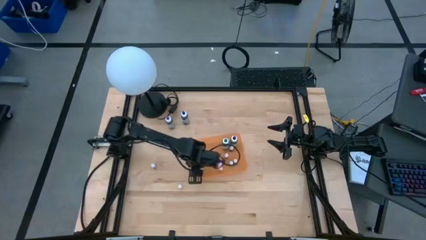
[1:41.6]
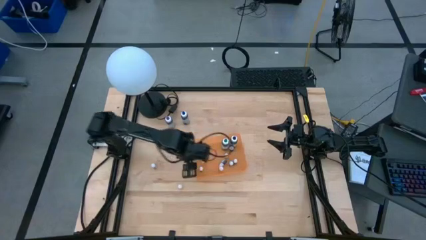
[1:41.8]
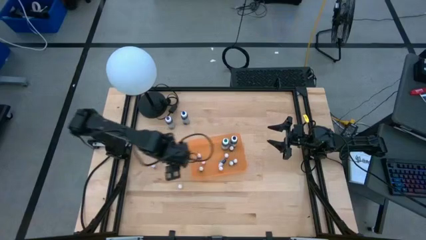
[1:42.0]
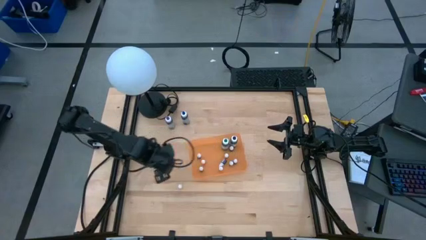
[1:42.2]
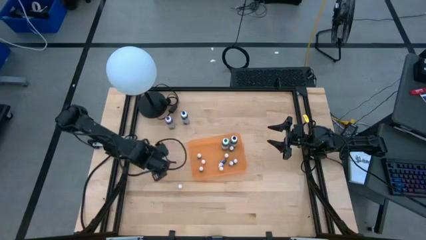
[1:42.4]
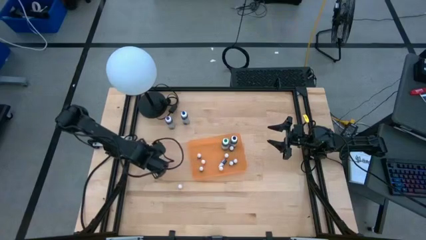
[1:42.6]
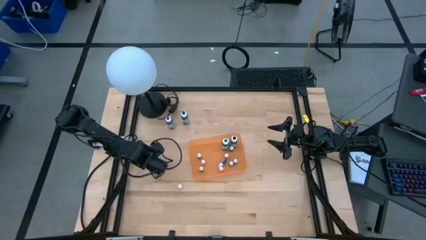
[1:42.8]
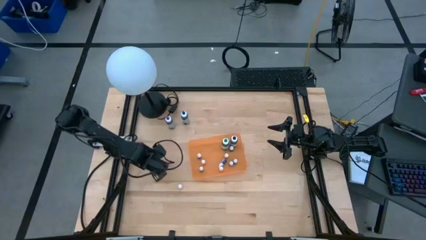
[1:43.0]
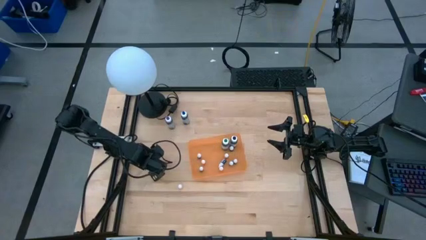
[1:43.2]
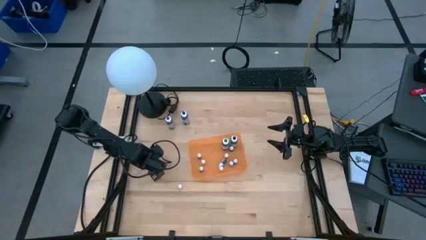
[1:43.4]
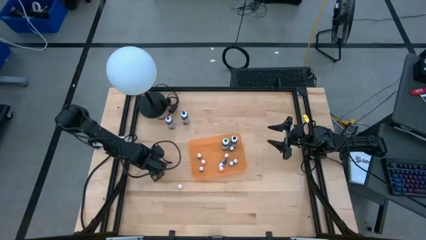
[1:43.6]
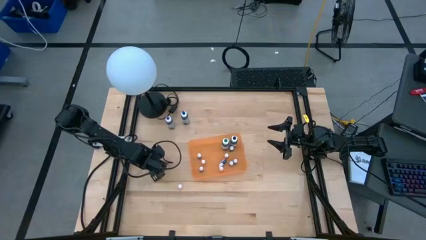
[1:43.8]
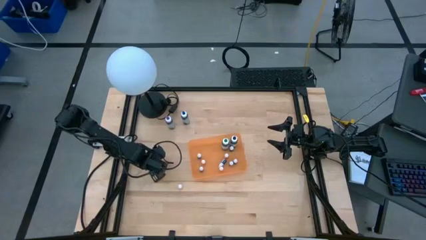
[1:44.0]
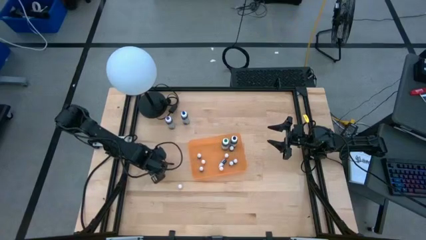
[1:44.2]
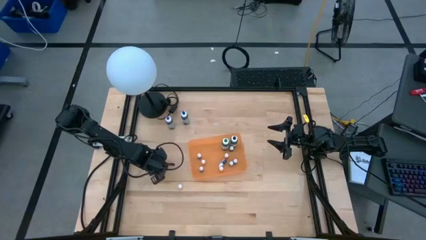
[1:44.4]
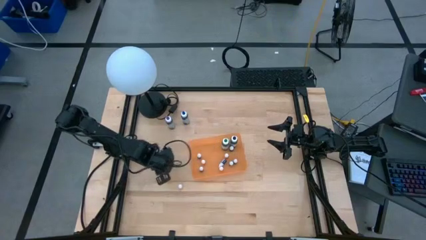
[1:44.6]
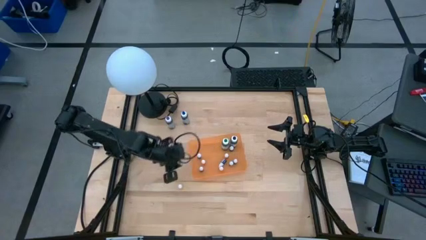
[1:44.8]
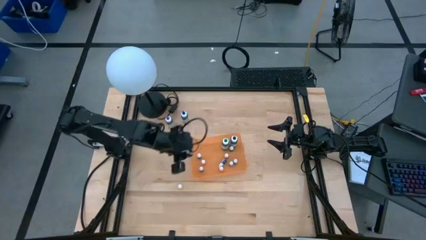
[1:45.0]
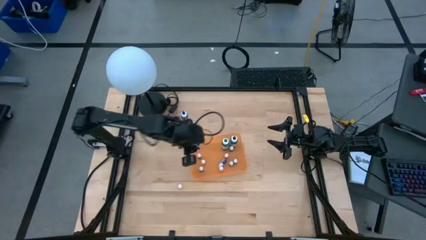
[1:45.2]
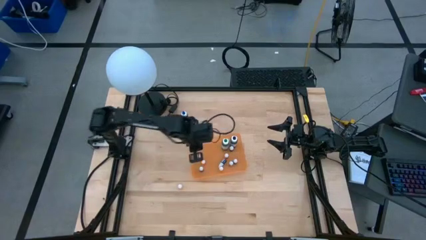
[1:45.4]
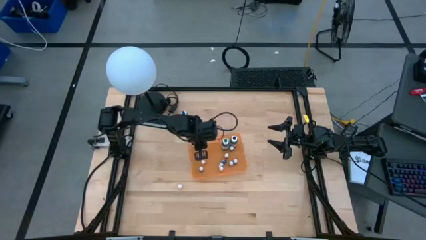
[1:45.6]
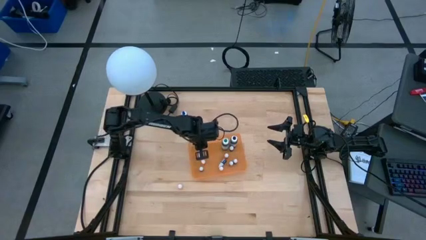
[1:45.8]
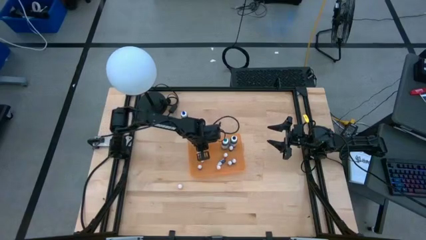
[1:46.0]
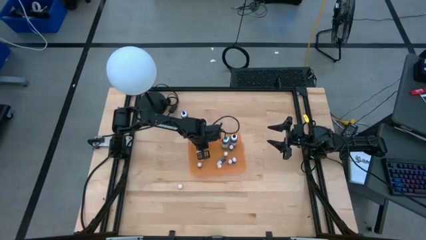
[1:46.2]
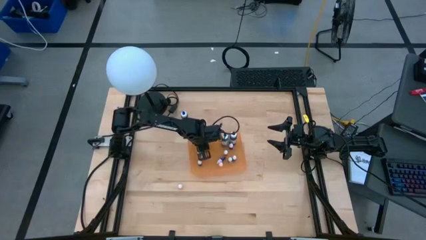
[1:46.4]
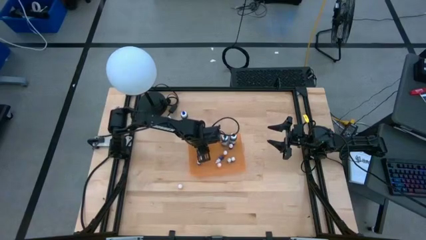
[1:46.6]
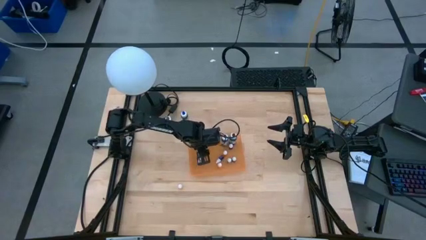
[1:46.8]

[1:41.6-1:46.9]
Task: Pick & Place food coloring
Put the small red food coloring bottle into the orange bin

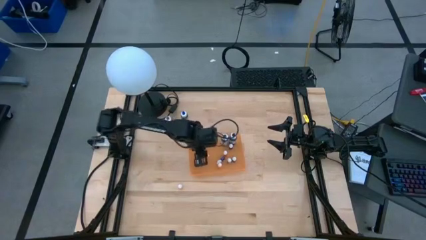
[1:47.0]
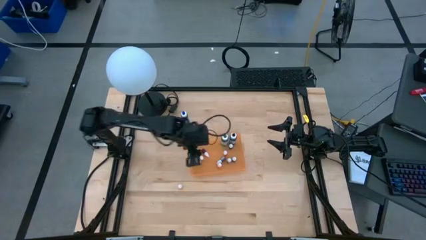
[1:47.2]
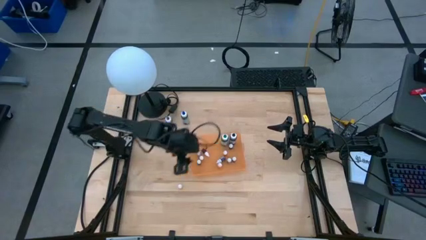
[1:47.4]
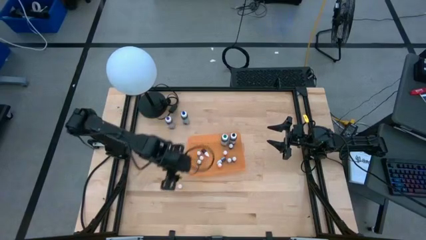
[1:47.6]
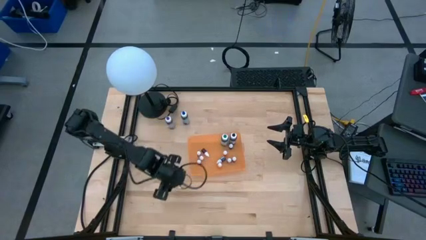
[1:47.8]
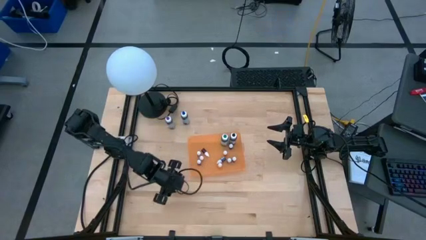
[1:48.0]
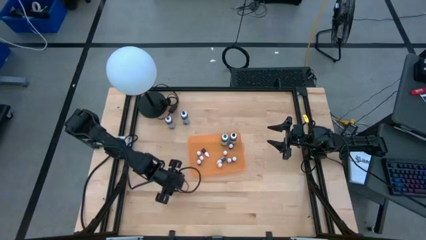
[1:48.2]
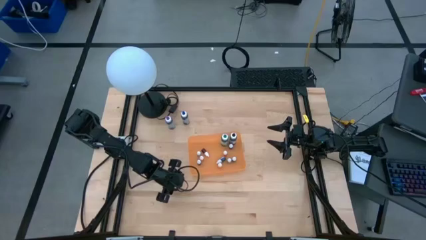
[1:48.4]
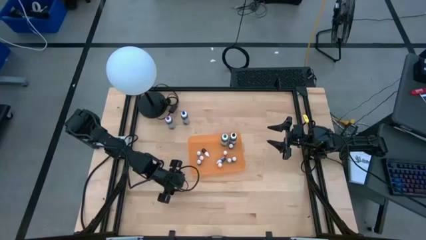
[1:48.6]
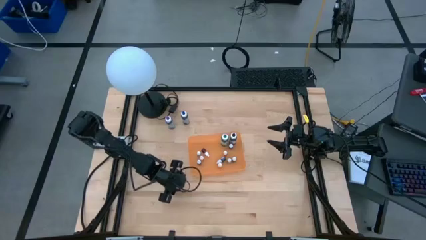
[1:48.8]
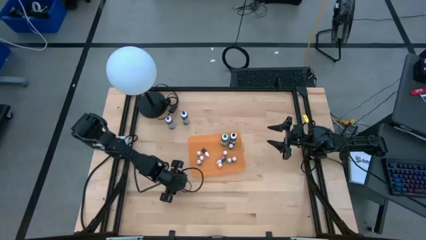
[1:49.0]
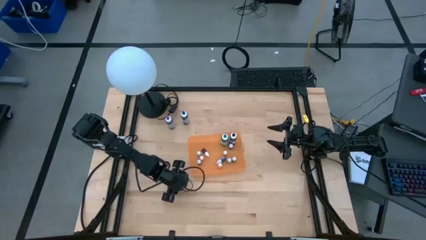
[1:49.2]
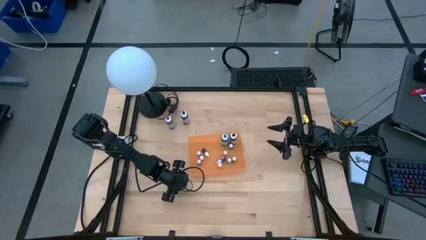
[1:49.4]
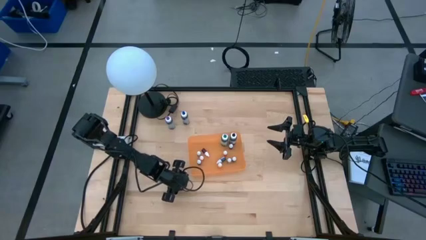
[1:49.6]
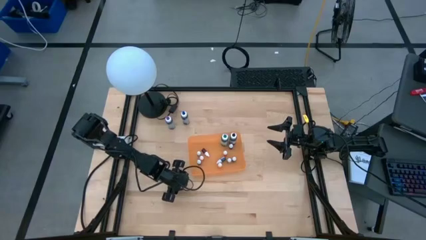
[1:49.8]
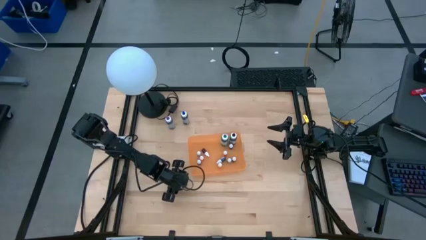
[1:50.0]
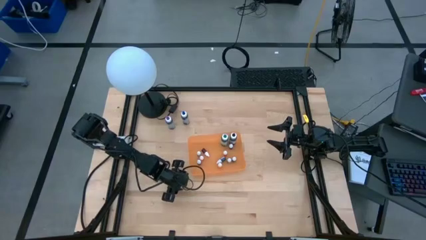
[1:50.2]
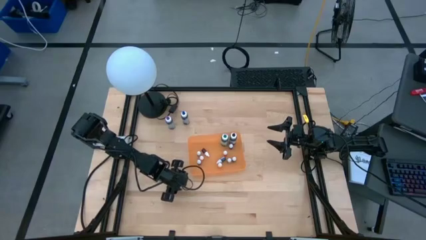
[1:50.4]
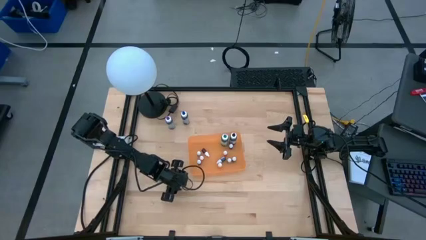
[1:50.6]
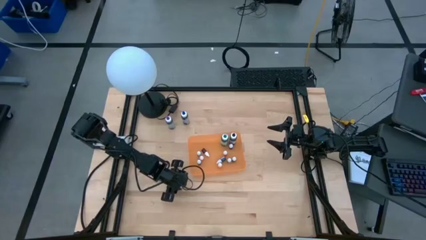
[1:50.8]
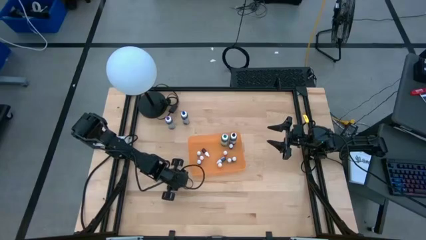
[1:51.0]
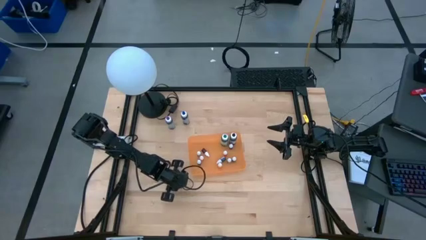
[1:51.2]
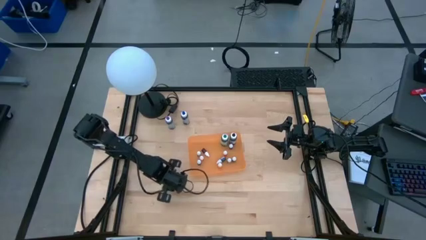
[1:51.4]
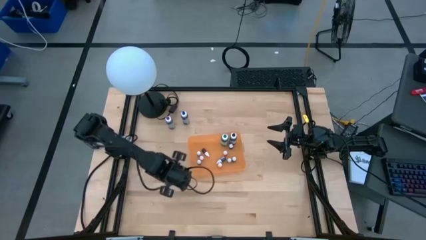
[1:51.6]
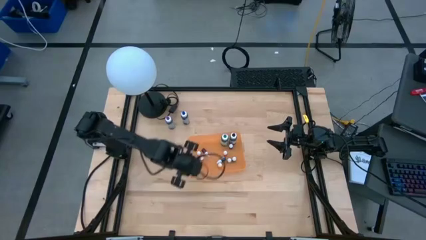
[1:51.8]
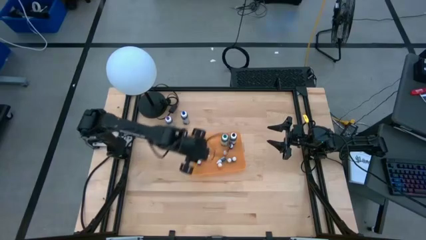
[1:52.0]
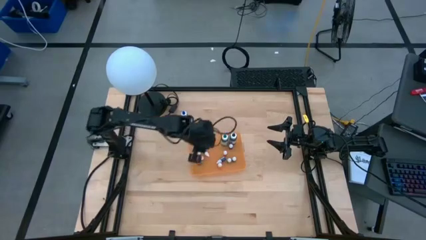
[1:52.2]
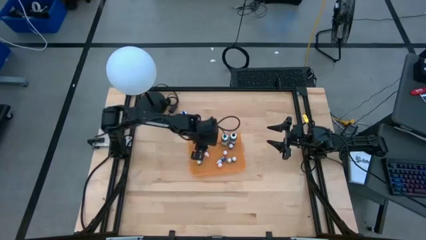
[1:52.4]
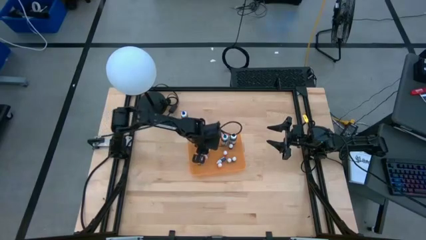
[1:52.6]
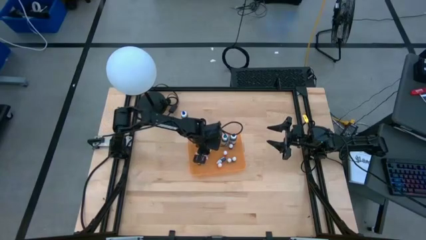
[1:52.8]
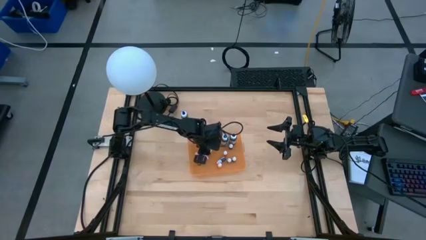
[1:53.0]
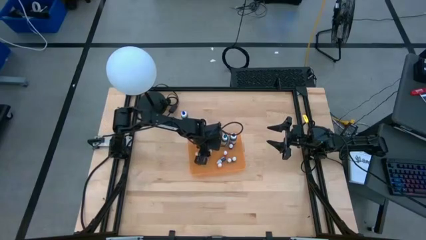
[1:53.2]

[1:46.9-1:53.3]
Put the small orange food coloring bottle into the orange bin

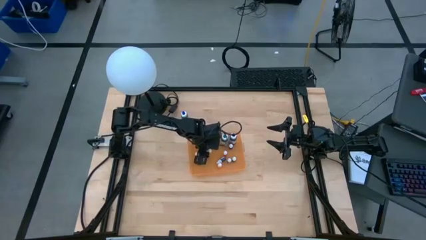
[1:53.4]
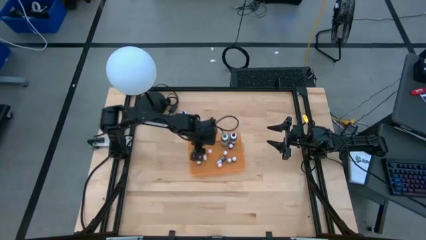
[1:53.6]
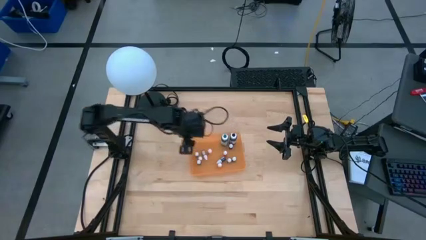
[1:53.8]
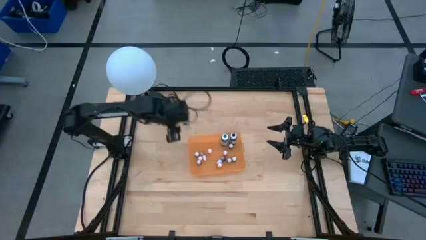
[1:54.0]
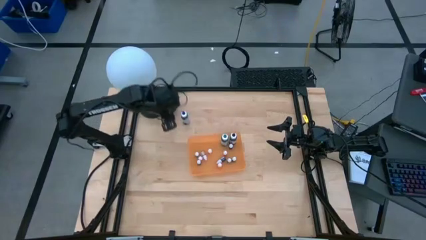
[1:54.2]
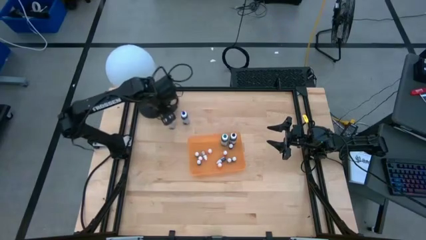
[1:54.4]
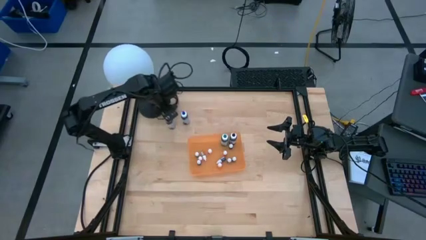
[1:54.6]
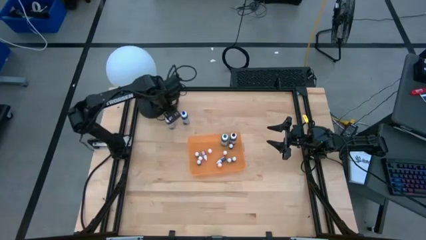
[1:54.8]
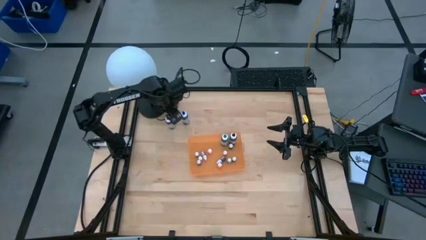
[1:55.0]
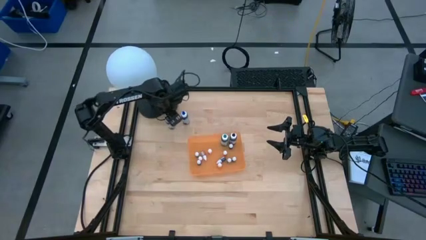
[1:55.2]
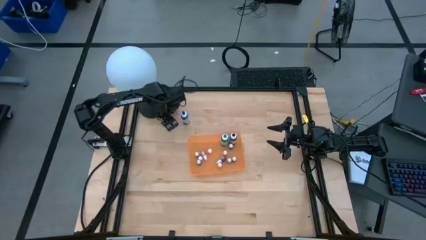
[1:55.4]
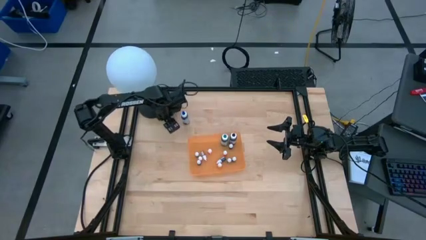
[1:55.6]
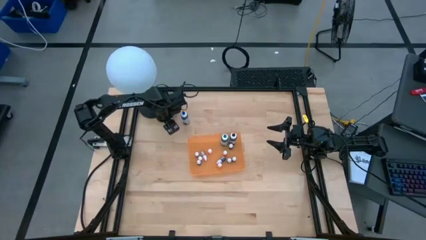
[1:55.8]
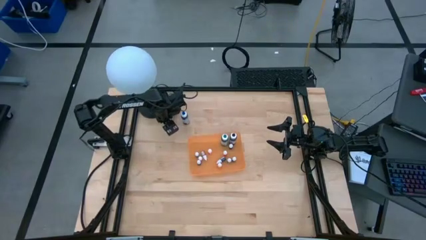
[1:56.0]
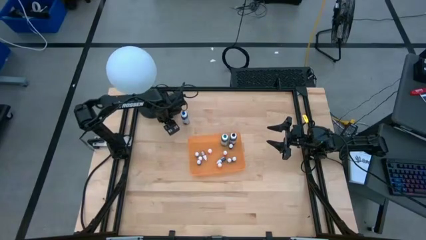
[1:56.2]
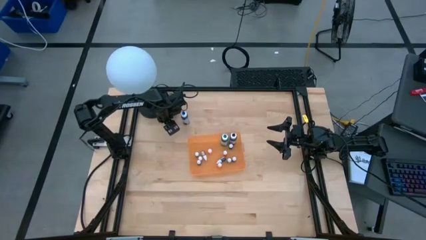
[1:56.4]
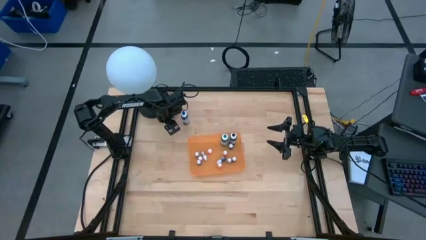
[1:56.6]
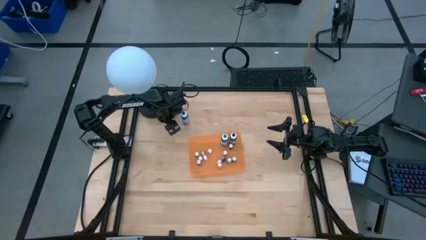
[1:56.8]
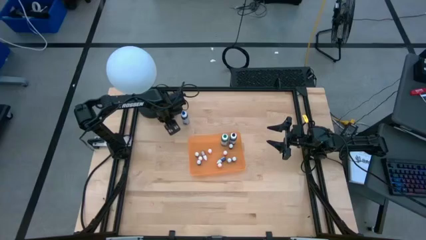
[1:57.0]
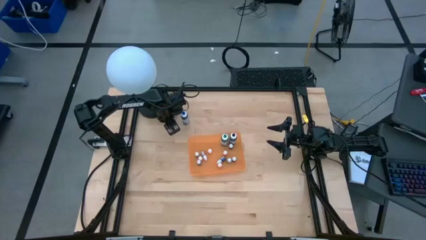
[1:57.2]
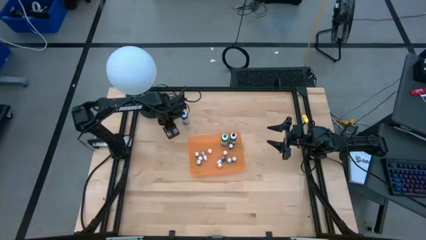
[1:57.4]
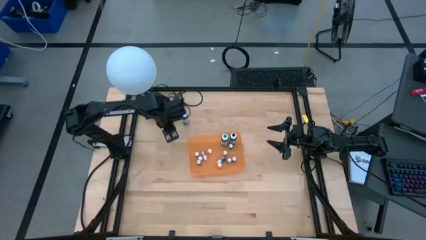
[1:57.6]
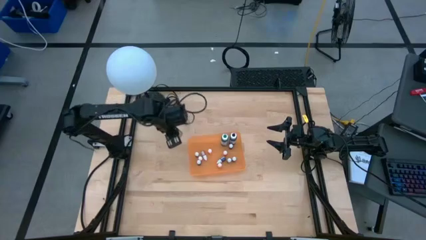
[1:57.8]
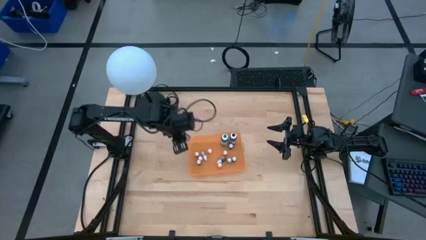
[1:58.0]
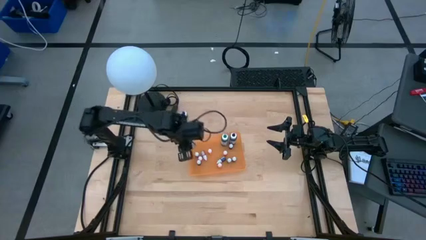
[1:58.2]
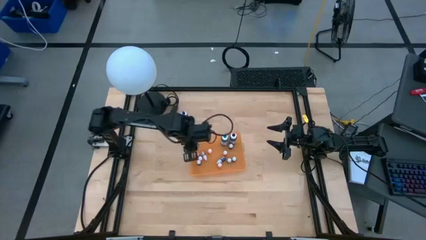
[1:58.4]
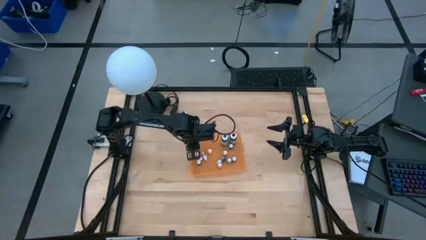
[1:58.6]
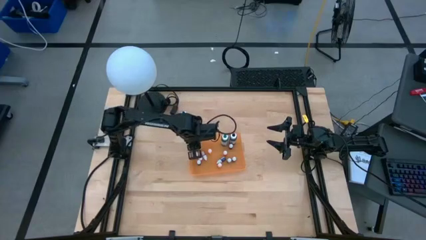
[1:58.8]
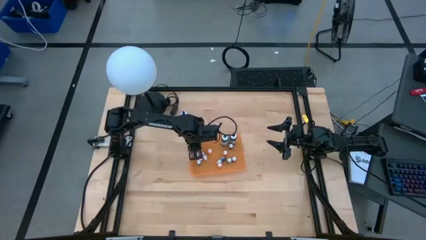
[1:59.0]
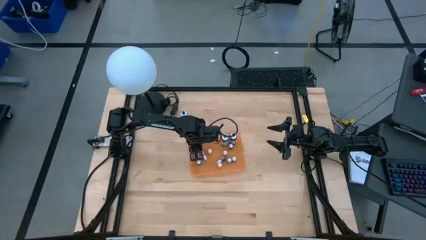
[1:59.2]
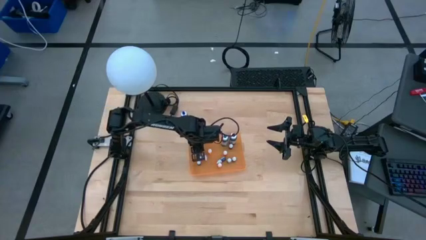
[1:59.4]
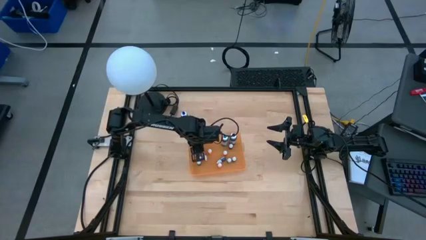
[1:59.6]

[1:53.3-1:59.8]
Put the large purple food coloring bottle into the orange bin
